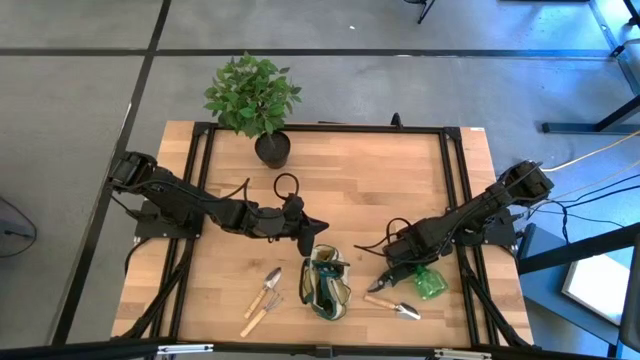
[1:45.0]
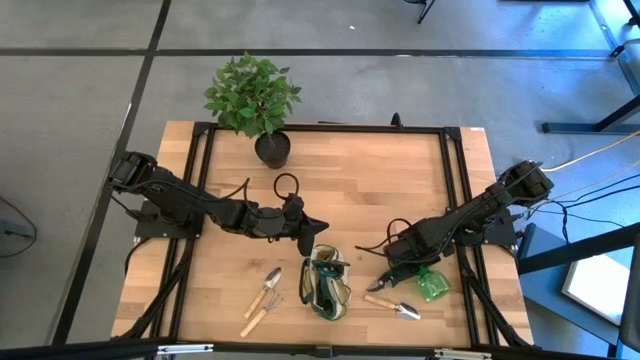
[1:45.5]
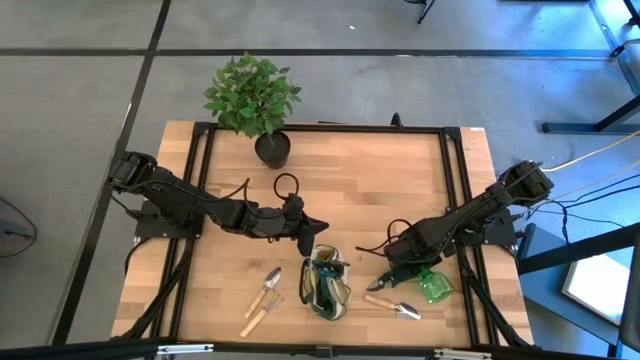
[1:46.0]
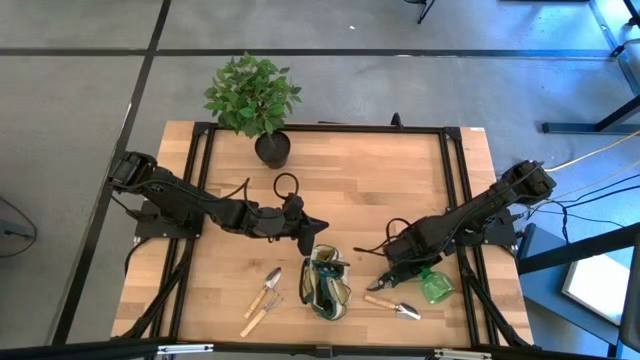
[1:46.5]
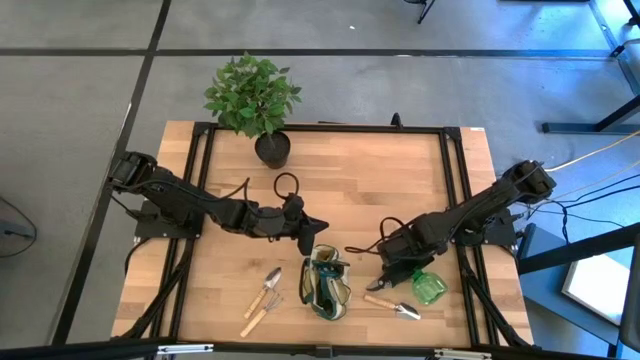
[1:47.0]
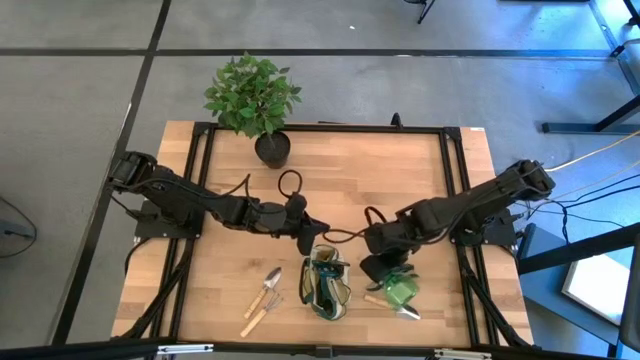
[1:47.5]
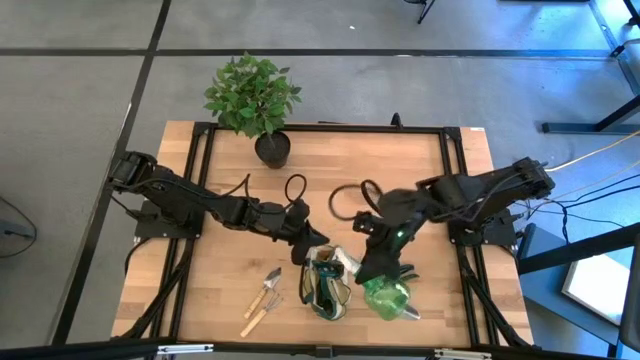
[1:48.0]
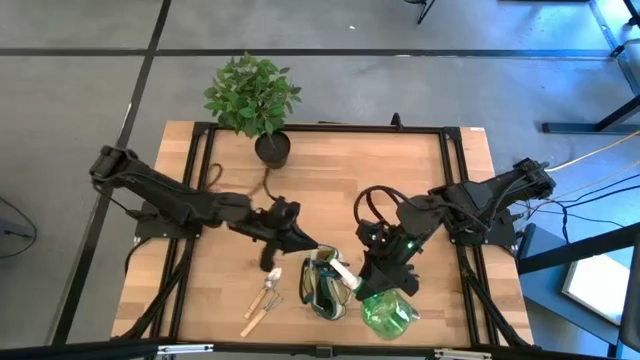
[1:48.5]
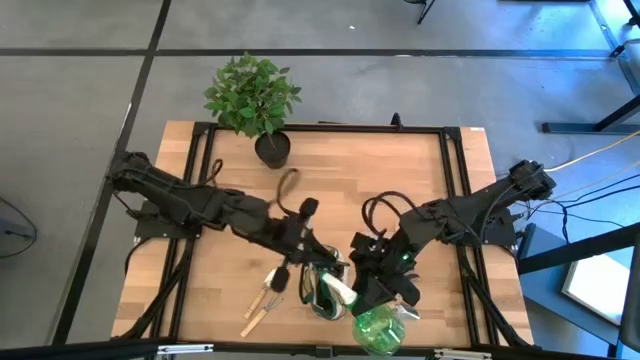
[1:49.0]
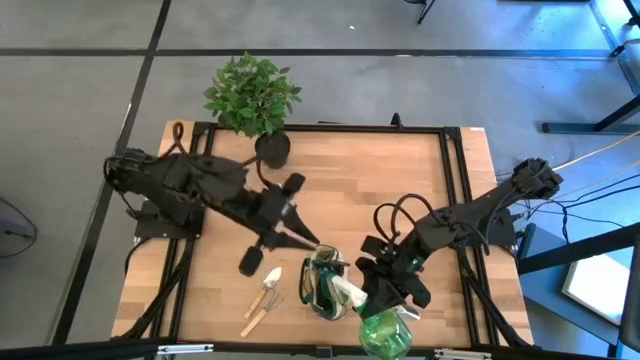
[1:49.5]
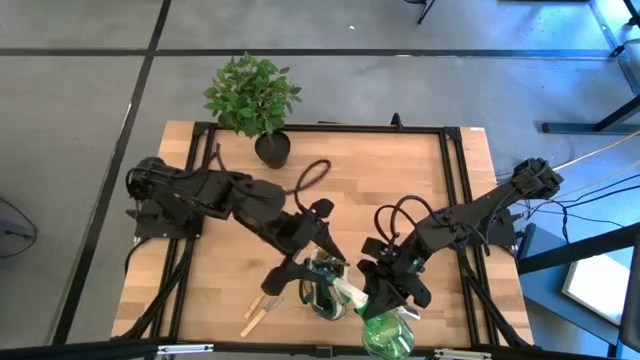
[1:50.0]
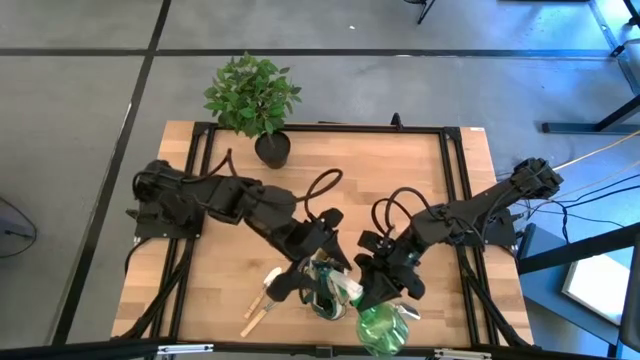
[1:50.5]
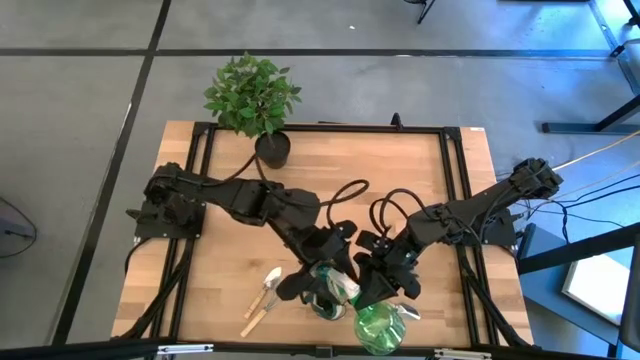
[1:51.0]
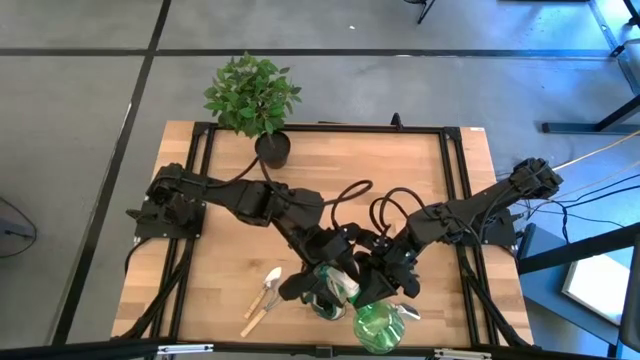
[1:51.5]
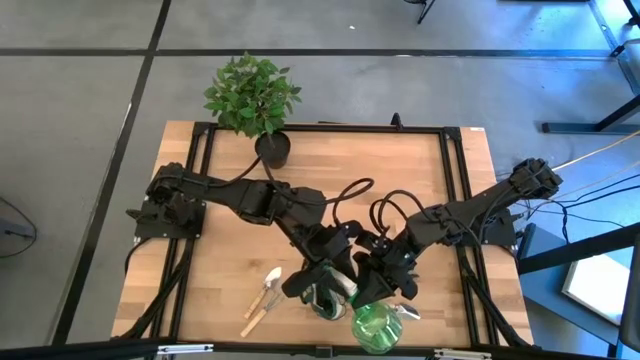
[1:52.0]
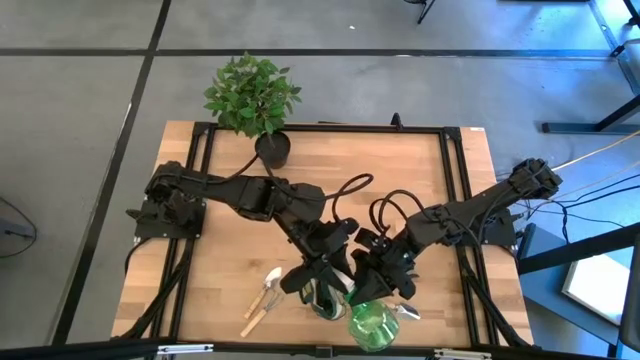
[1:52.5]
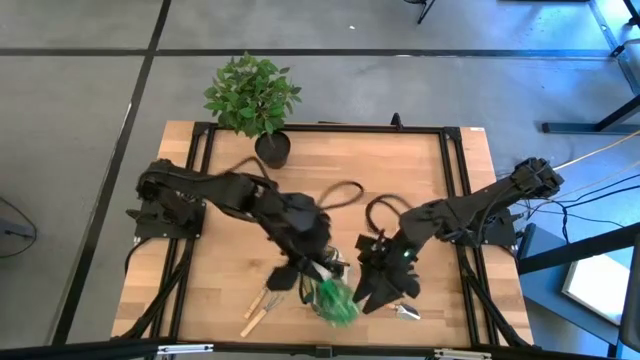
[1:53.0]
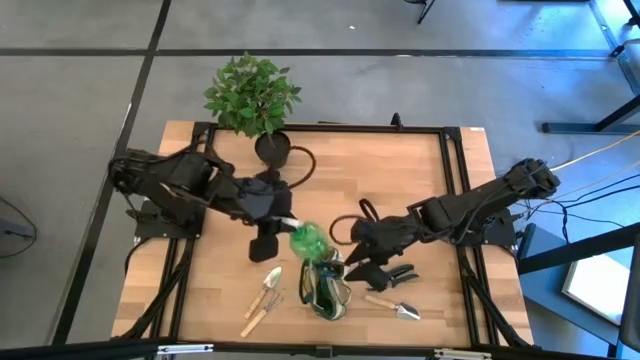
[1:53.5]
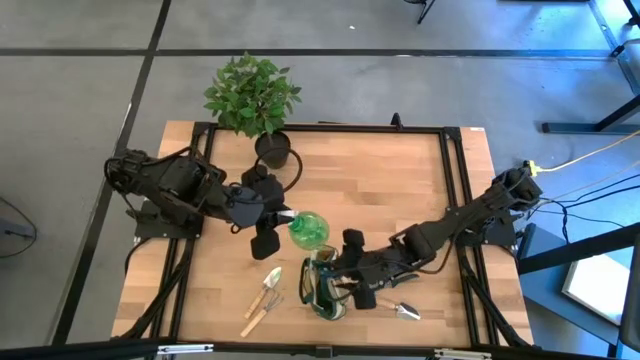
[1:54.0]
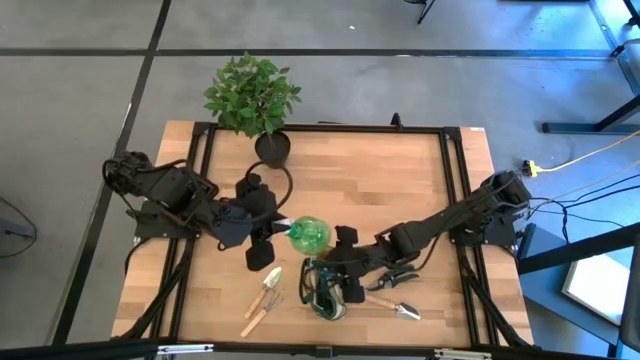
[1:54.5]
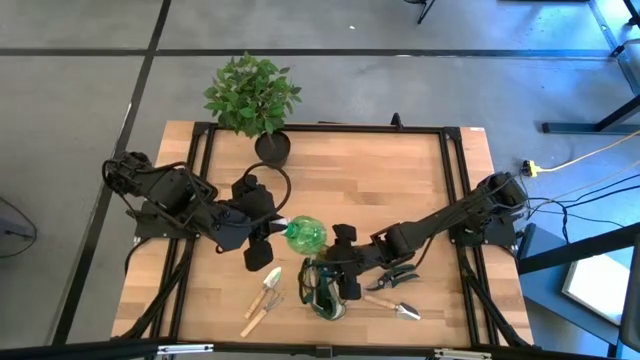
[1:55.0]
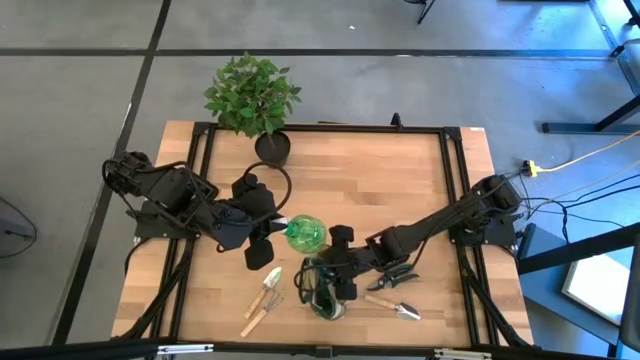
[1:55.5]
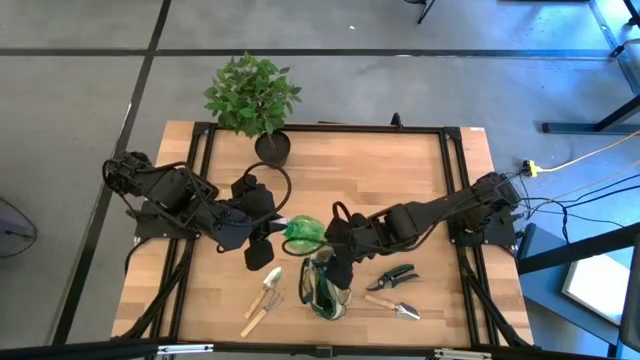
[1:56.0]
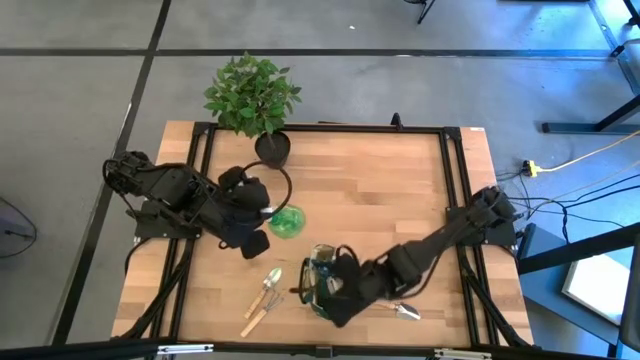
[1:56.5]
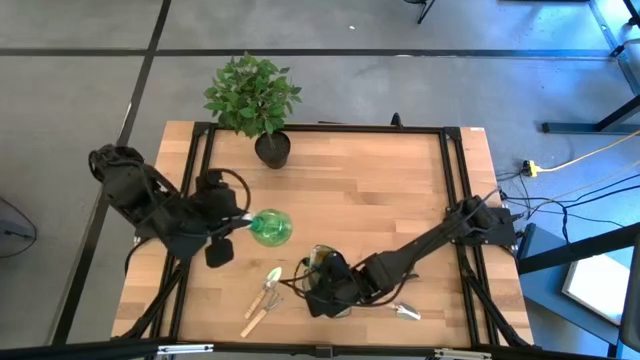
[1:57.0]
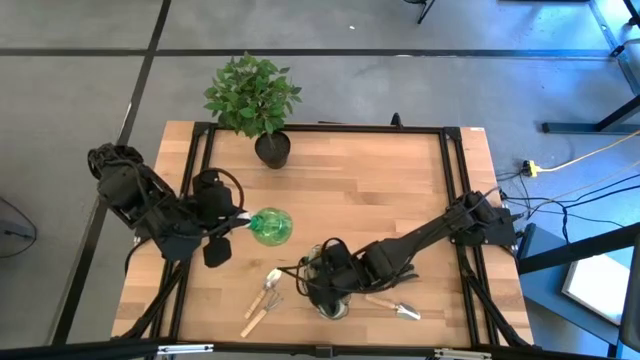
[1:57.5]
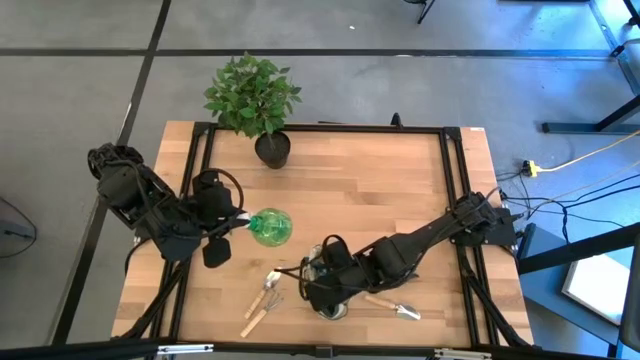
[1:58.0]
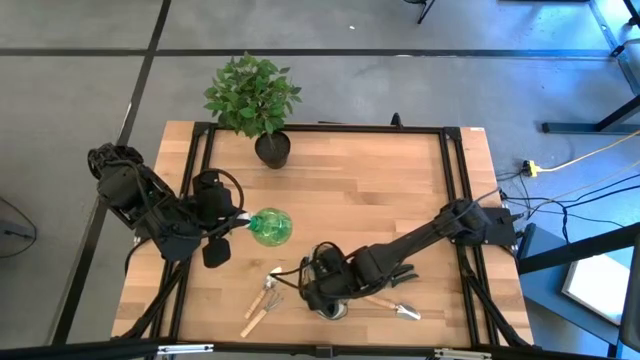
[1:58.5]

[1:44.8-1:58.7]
Task: Pick & Place Garden tools in Gardening bag
Put the green spray bottle into the brown gardening bag

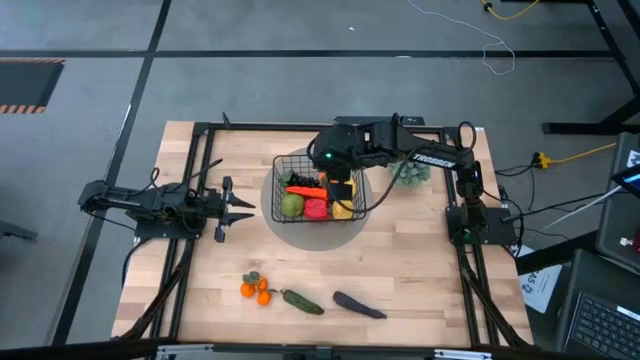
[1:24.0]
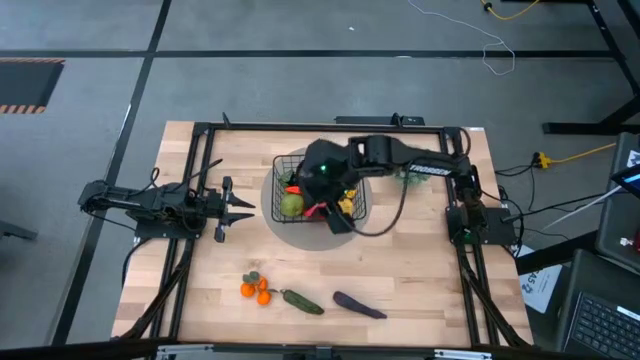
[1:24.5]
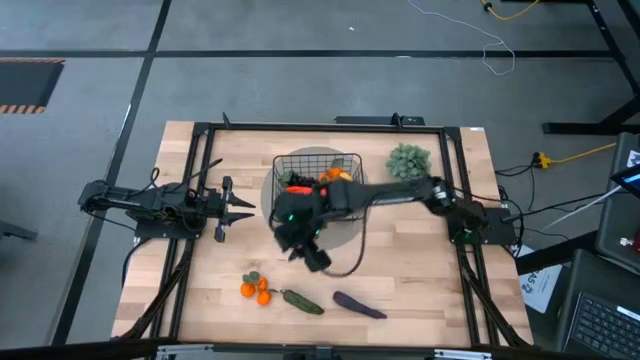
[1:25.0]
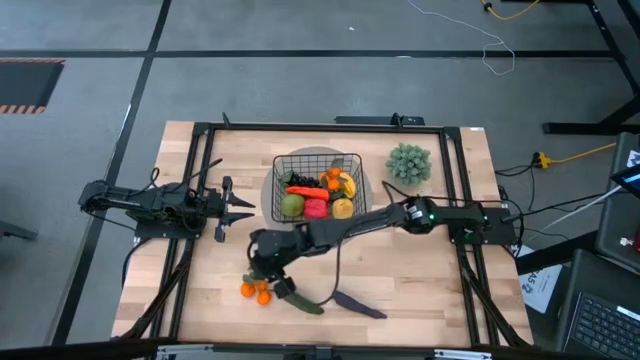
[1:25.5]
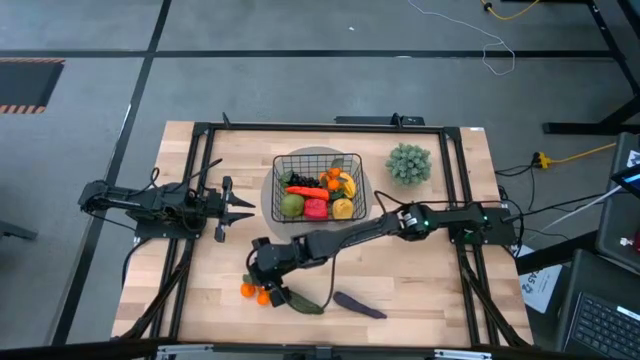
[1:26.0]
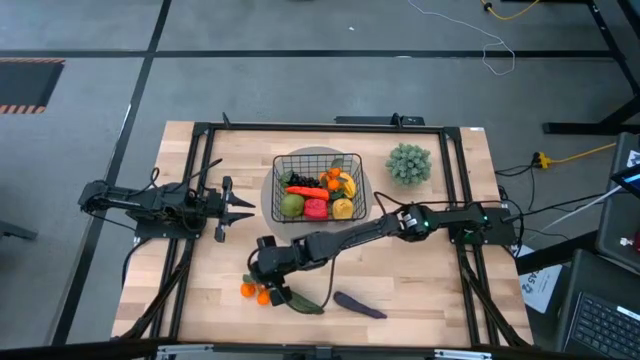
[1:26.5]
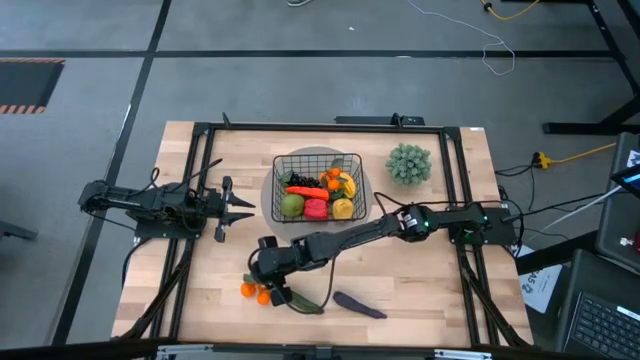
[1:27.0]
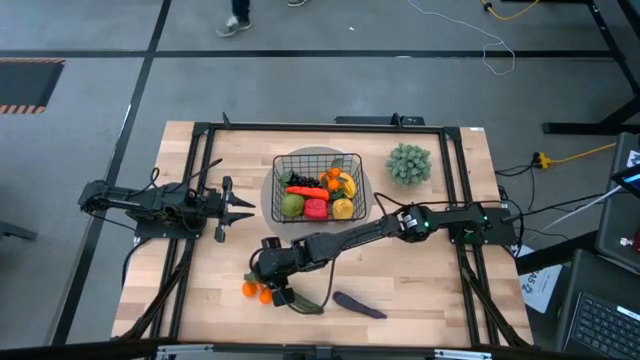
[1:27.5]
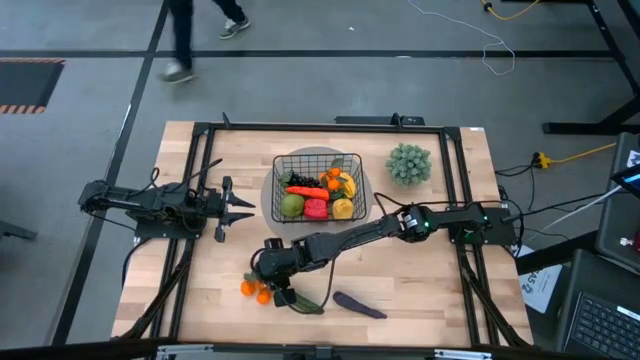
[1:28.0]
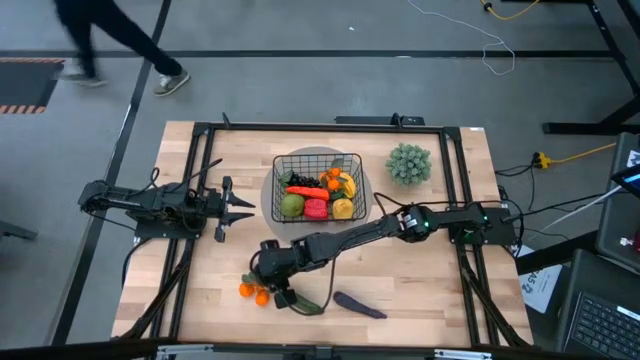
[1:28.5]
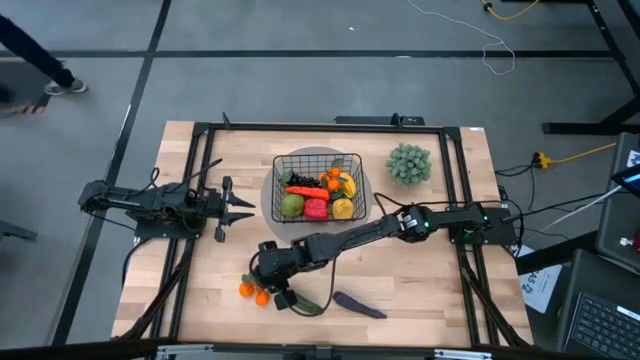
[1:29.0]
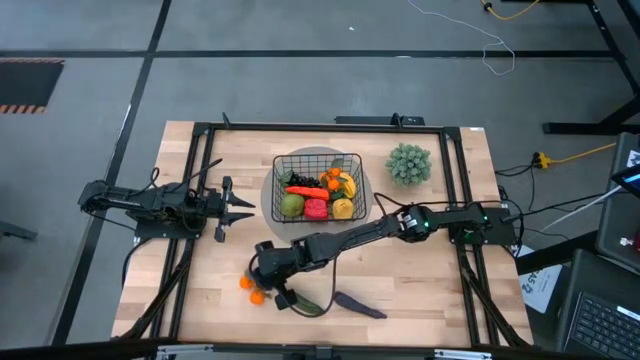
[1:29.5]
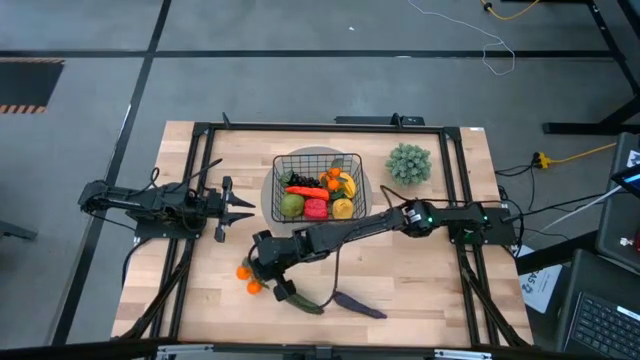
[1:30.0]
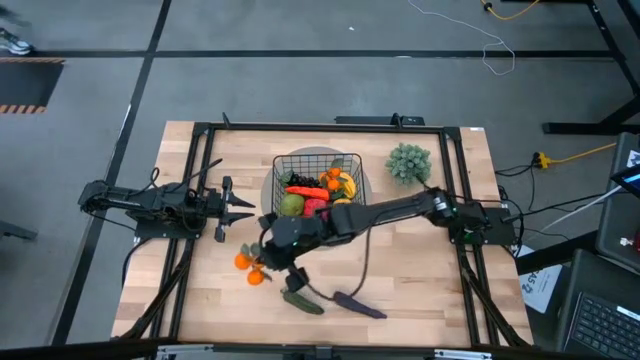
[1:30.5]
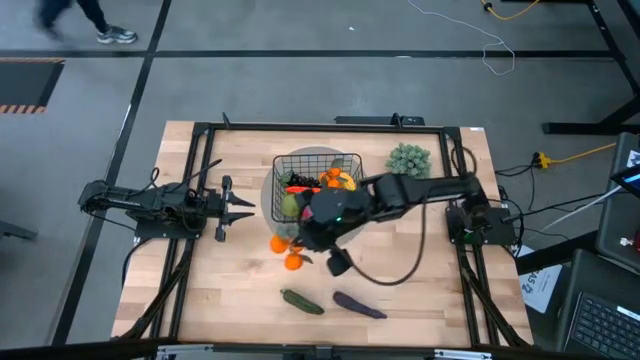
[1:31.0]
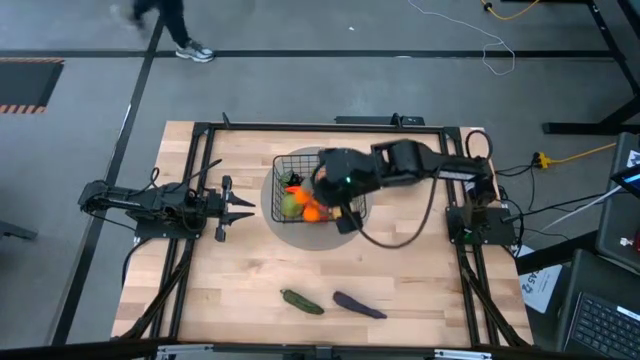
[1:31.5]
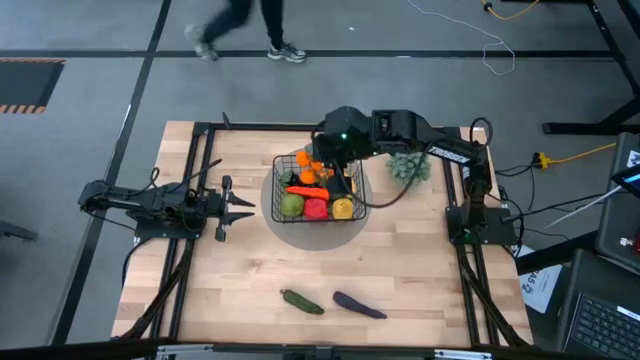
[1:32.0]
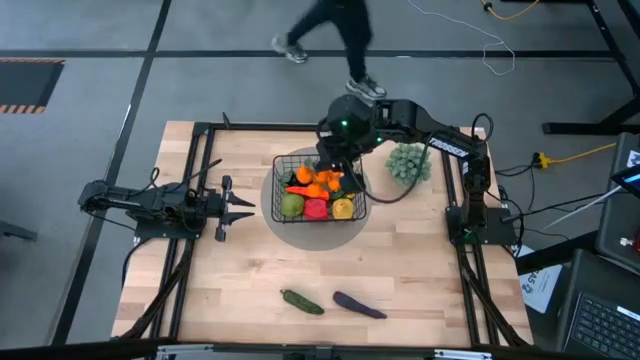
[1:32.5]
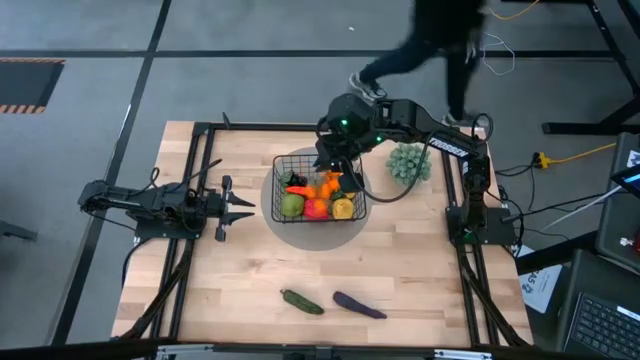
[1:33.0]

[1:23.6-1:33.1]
Task: Build produce basket
Put the tangerine into the black wire basket
